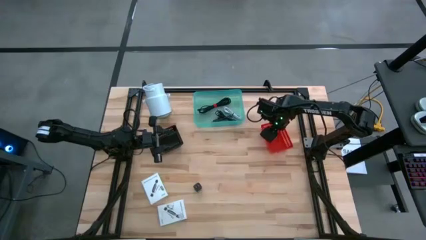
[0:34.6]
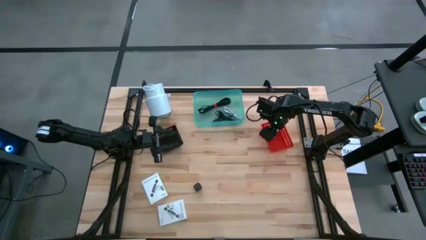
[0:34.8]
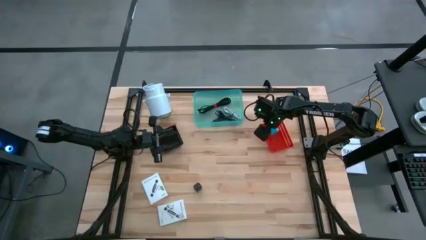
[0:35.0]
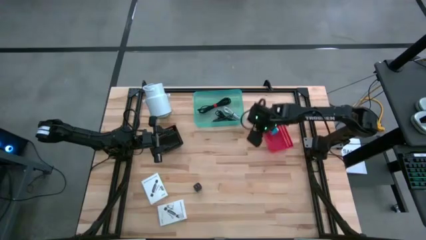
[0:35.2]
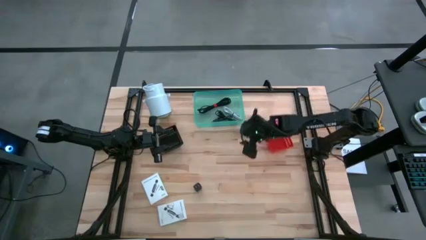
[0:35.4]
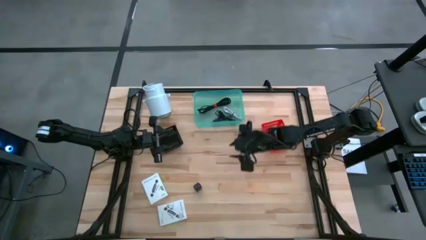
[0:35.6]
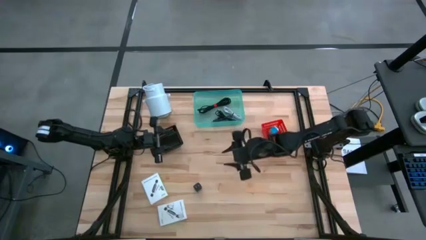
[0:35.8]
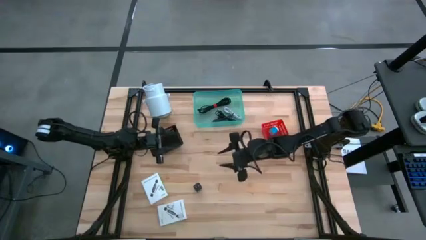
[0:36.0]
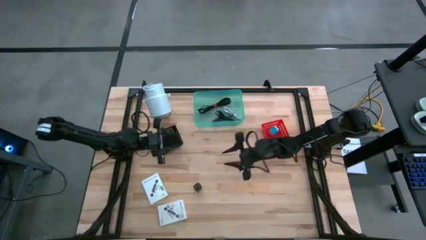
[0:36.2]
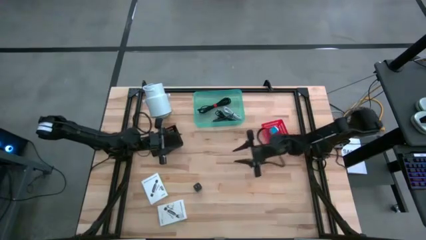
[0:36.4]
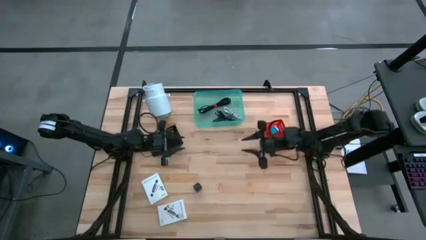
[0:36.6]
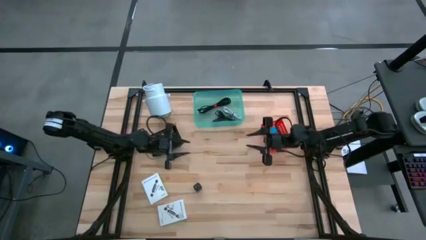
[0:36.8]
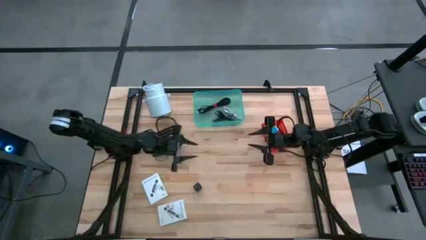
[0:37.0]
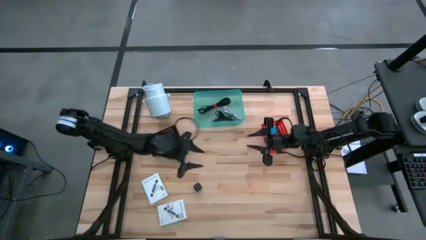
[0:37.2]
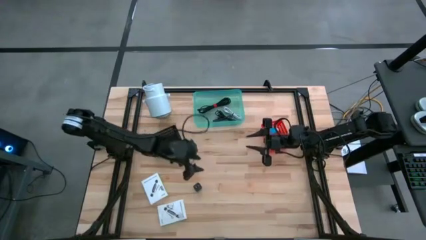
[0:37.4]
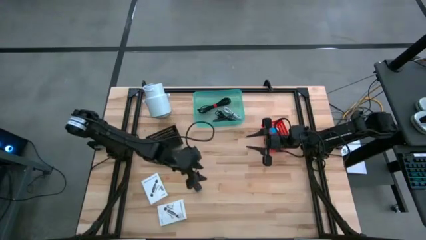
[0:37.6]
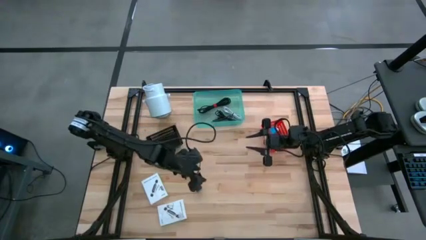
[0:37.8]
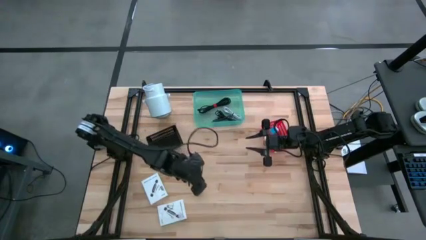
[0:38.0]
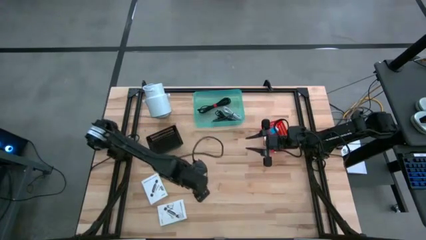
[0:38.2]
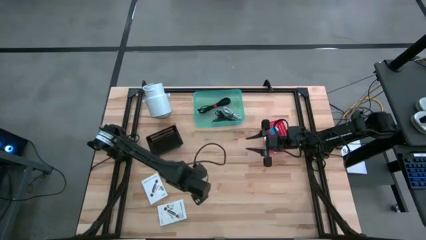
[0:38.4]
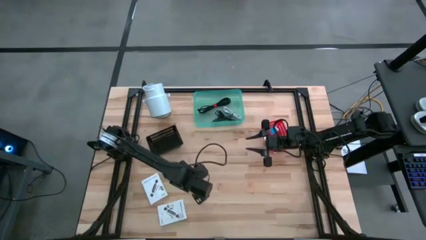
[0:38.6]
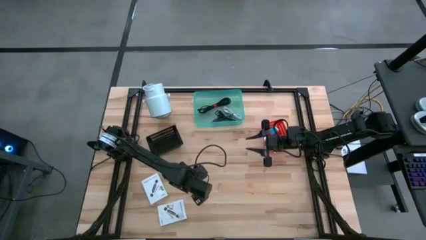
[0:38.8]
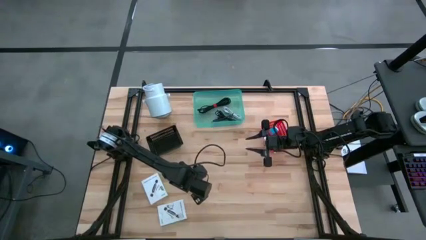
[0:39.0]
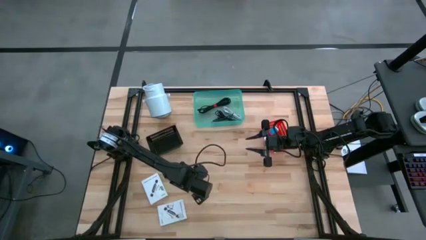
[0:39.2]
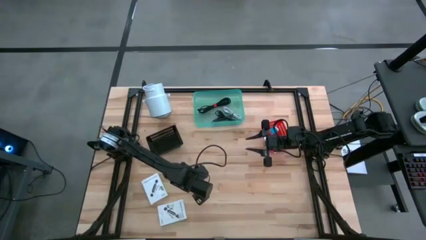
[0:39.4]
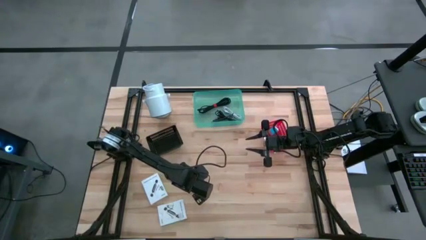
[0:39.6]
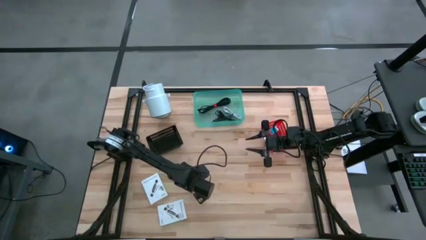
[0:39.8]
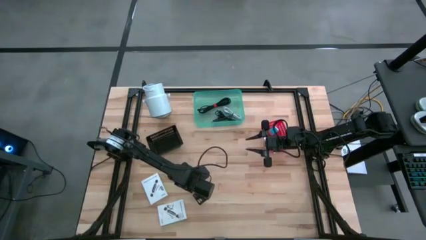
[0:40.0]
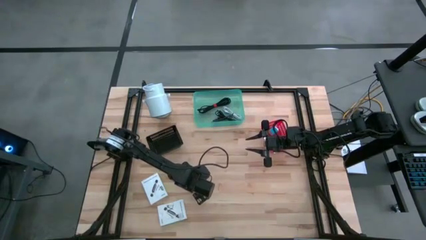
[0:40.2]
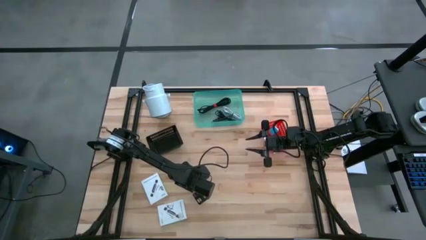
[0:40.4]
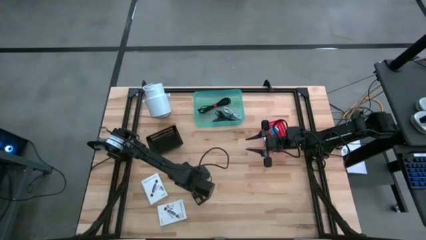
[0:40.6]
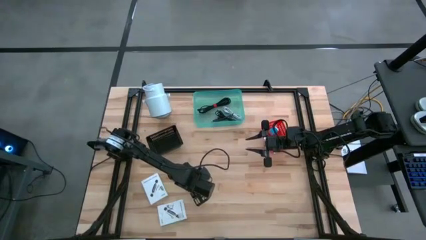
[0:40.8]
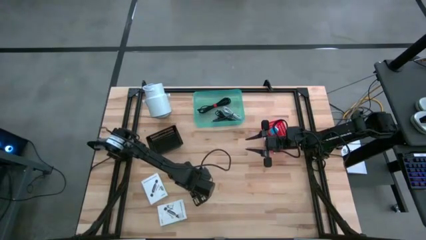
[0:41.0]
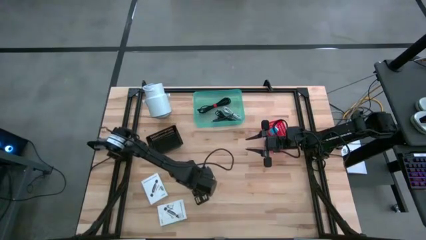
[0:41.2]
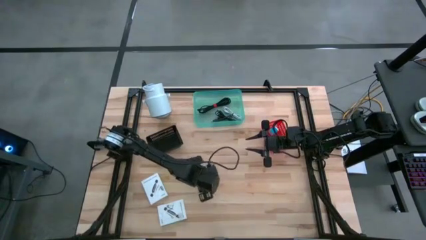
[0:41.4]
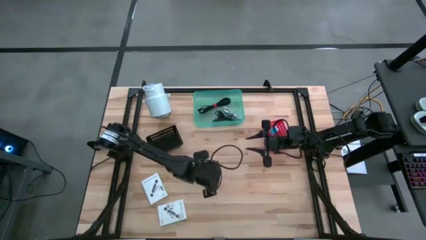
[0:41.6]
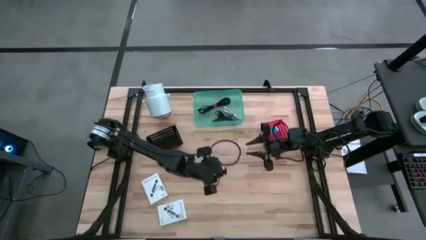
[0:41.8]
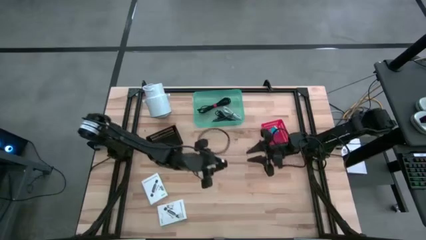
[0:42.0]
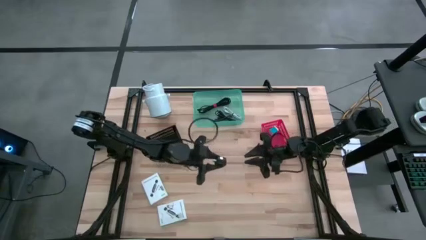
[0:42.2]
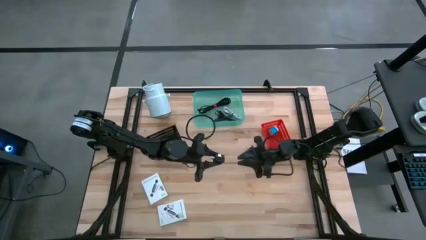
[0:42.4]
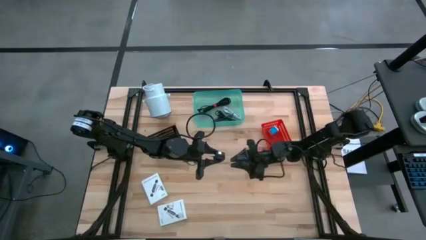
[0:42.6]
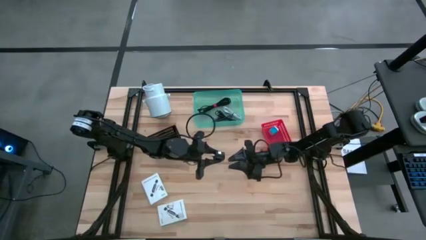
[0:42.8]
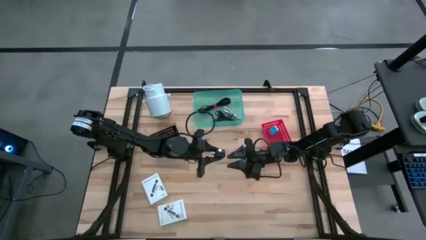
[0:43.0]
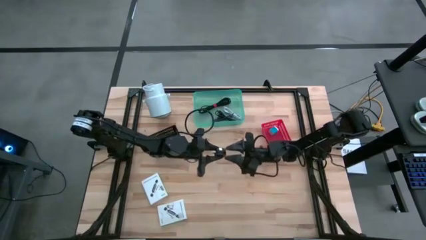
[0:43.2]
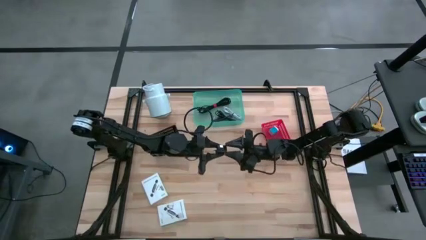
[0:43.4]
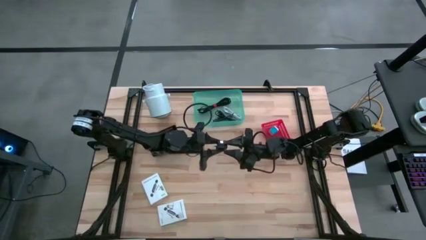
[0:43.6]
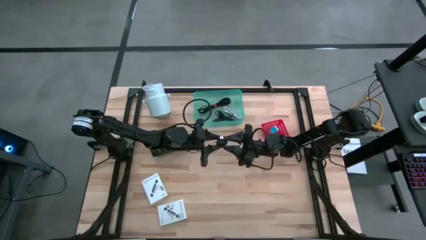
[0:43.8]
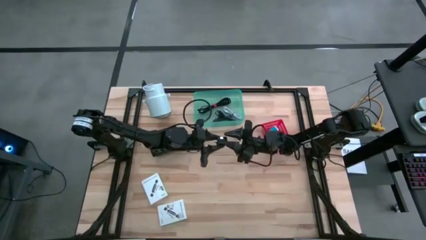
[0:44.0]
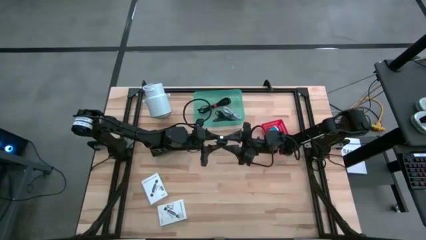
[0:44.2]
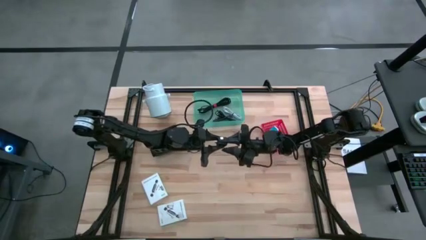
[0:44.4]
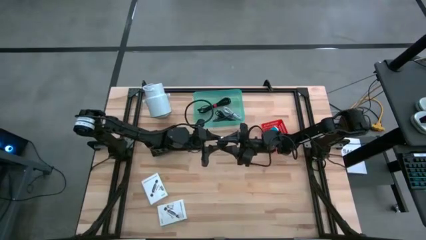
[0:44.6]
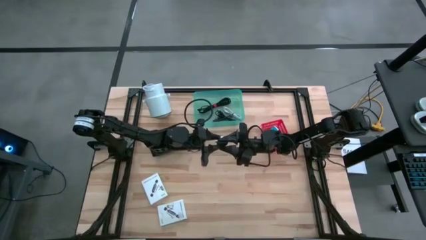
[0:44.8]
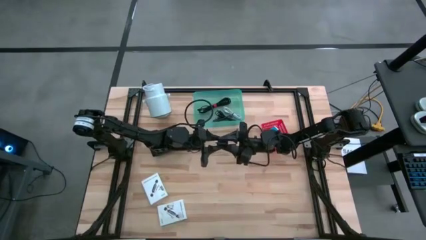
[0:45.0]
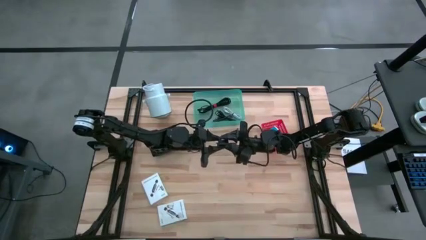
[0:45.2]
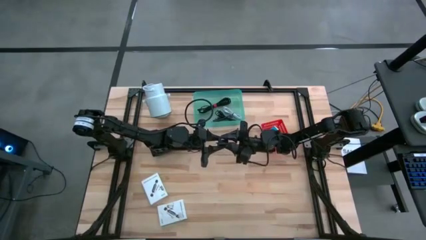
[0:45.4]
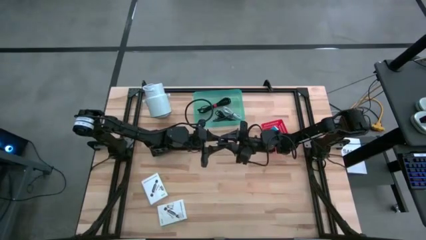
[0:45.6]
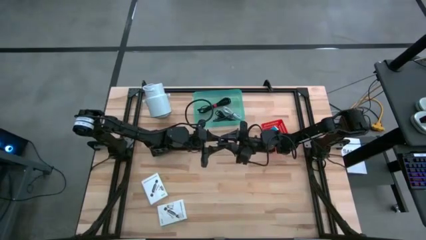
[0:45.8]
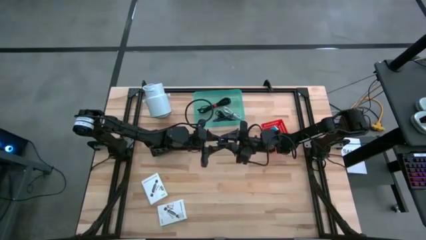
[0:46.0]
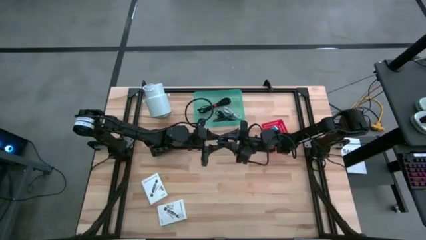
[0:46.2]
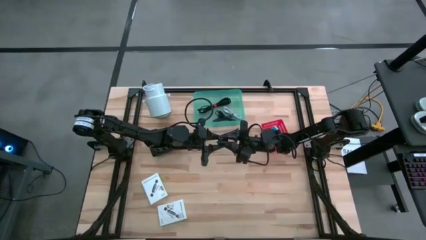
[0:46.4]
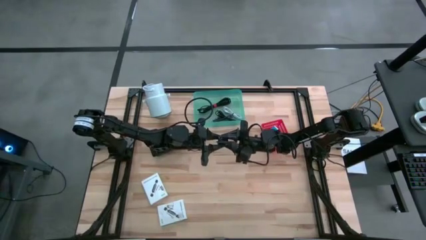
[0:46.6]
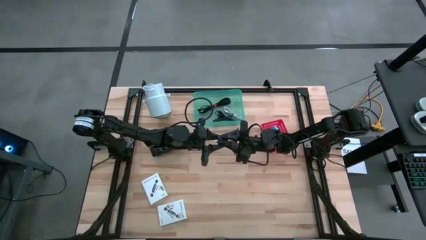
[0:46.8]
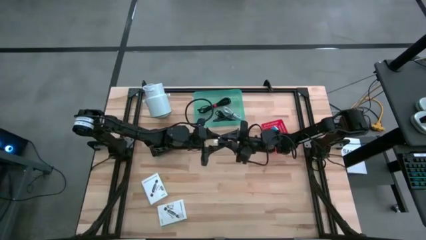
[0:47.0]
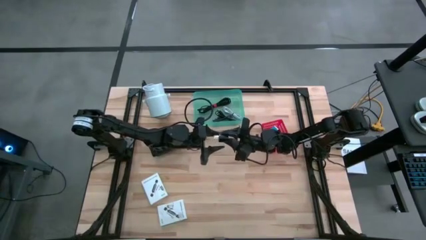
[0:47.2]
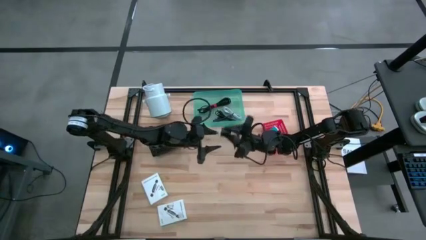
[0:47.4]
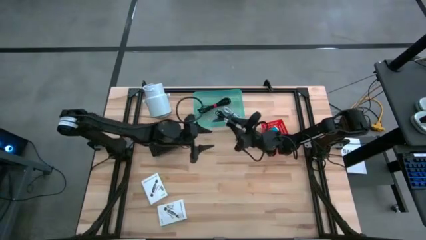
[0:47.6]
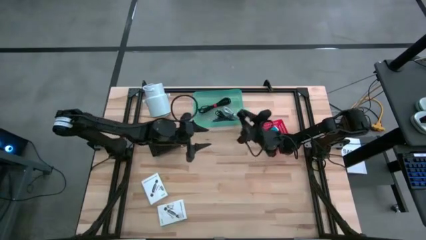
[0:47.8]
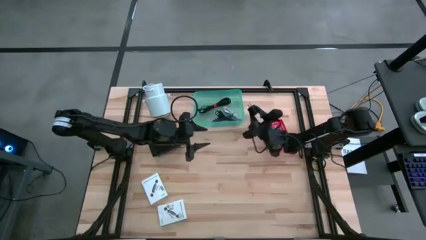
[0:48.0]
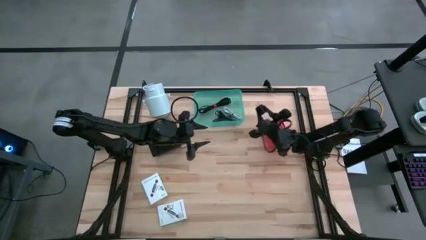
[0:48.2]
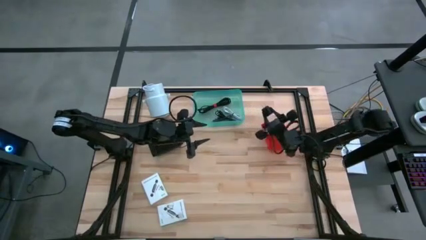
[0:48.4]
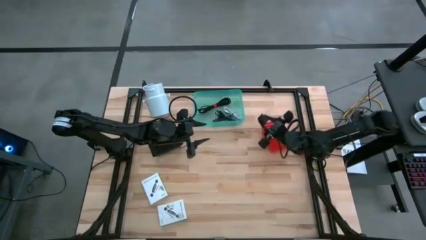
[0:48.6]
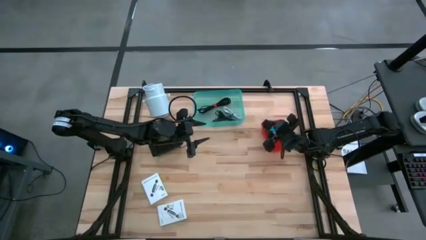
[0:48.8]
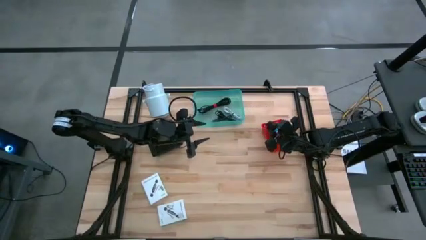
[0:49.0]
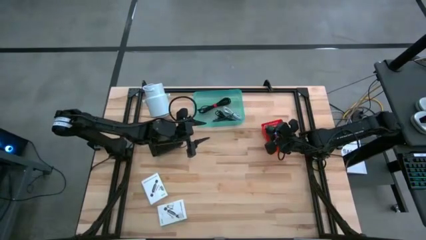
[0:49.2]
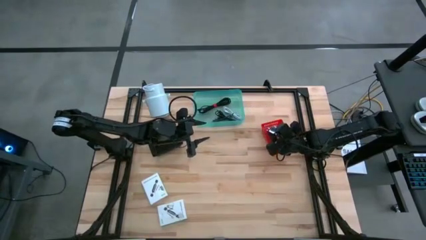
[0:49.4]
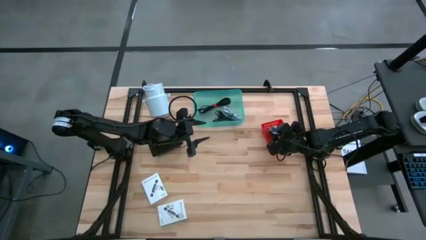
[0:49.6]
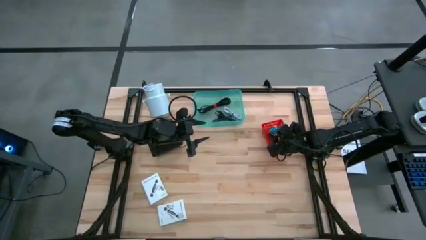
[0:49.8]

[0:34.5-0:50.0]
Task: Pick and place items into bin
Put the black charger adapter into the orange bin
